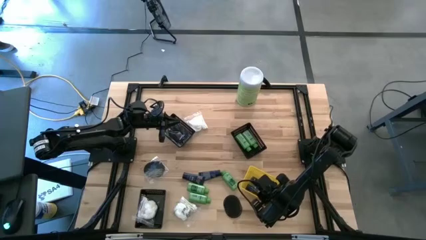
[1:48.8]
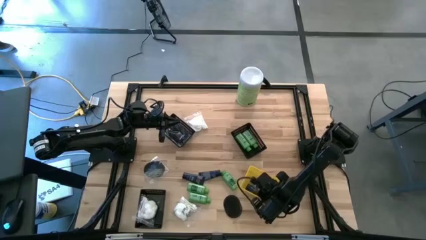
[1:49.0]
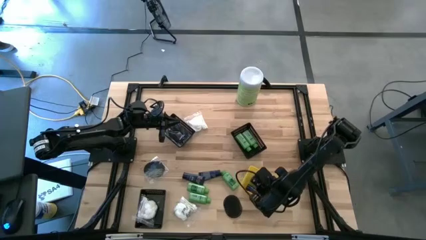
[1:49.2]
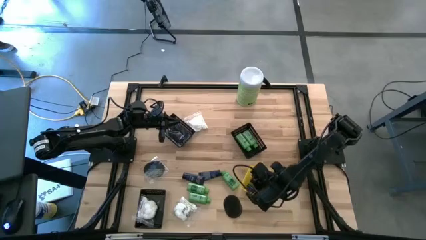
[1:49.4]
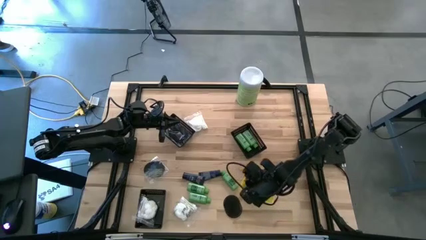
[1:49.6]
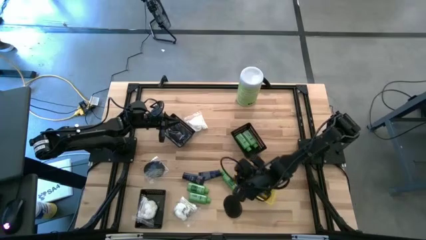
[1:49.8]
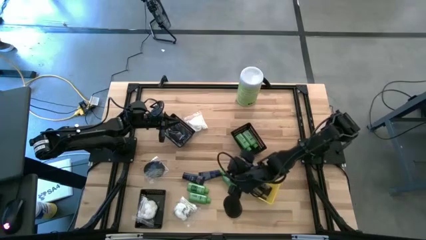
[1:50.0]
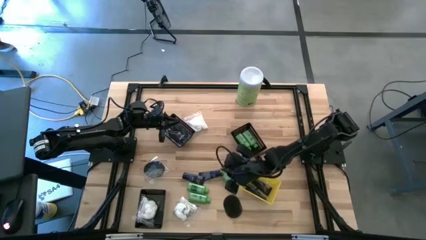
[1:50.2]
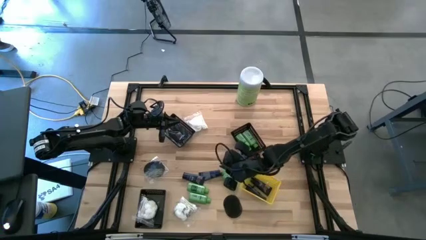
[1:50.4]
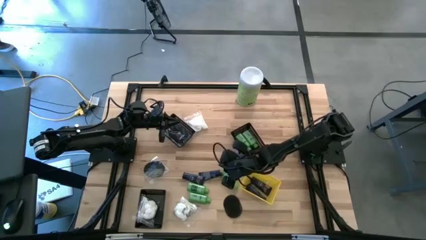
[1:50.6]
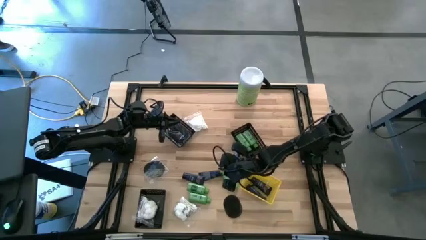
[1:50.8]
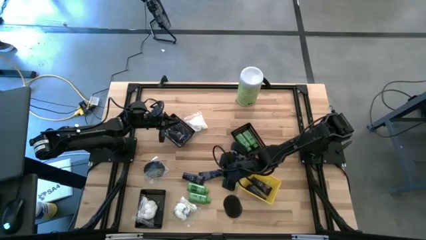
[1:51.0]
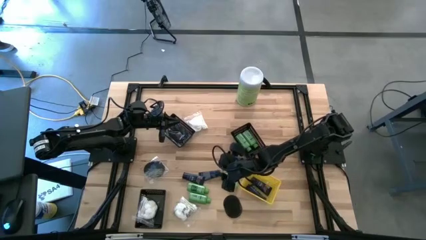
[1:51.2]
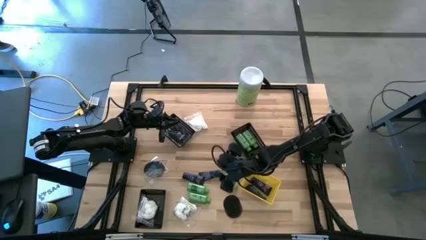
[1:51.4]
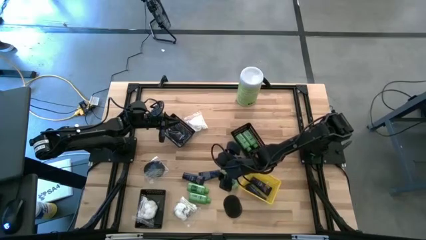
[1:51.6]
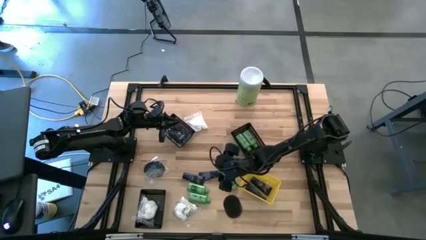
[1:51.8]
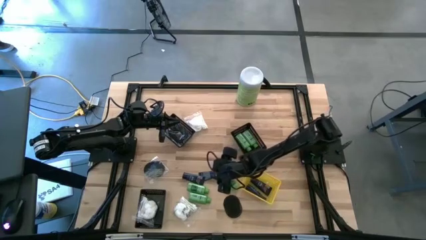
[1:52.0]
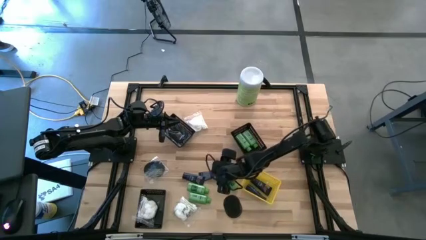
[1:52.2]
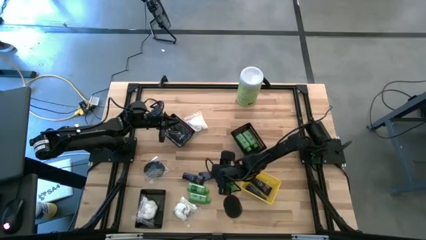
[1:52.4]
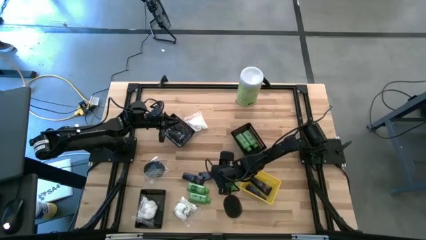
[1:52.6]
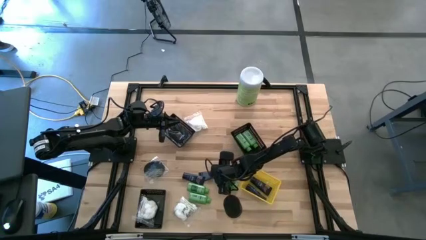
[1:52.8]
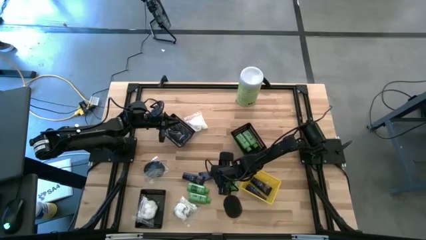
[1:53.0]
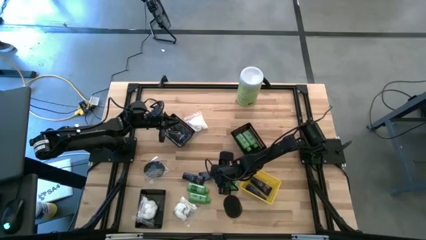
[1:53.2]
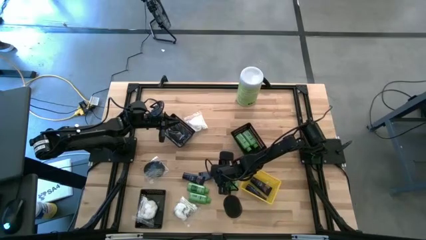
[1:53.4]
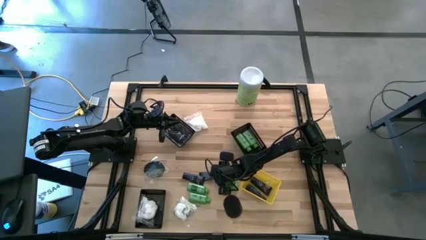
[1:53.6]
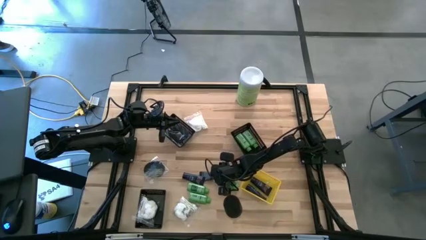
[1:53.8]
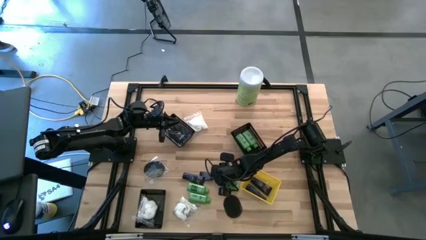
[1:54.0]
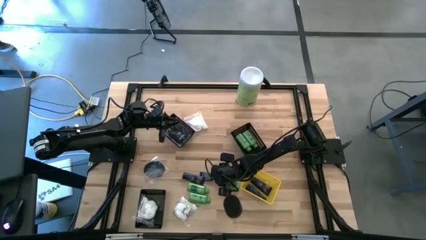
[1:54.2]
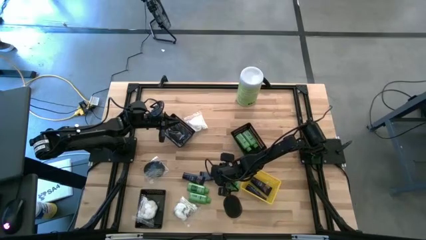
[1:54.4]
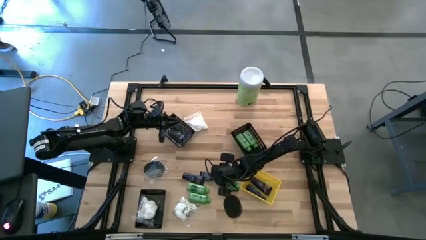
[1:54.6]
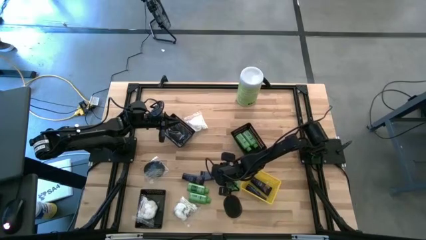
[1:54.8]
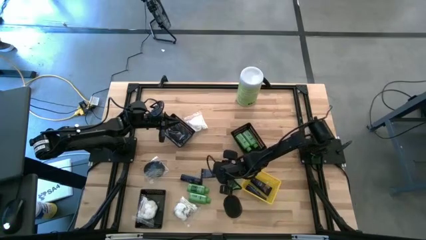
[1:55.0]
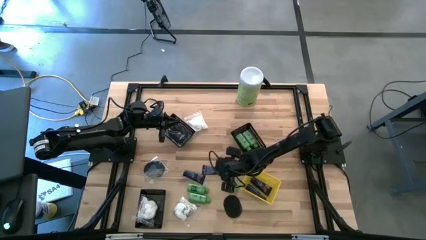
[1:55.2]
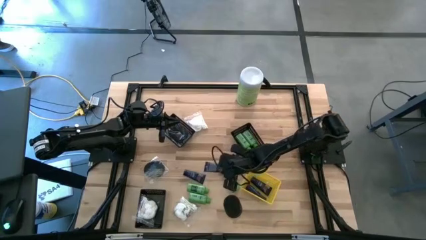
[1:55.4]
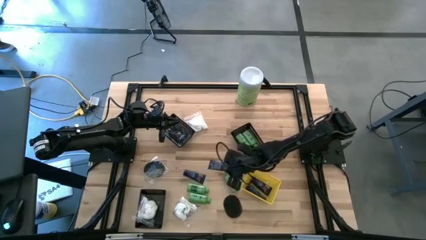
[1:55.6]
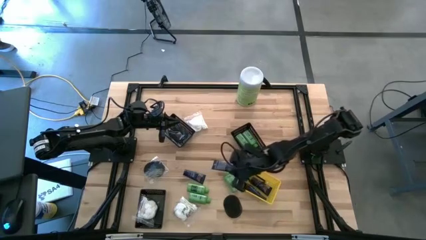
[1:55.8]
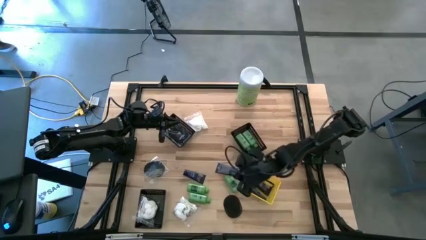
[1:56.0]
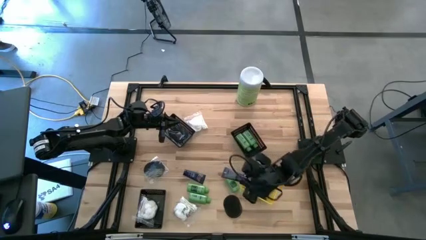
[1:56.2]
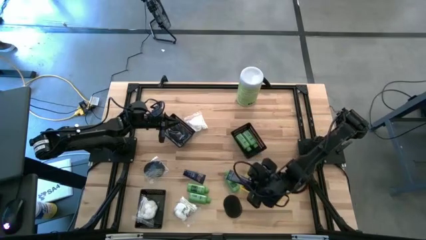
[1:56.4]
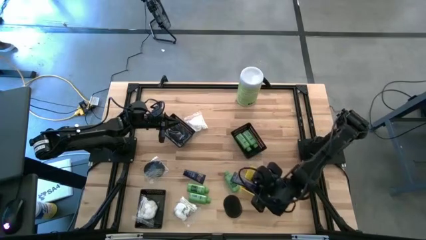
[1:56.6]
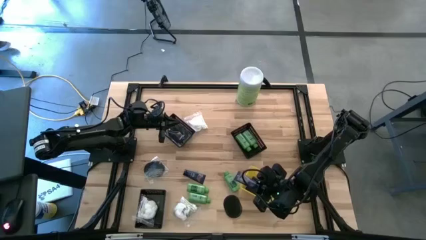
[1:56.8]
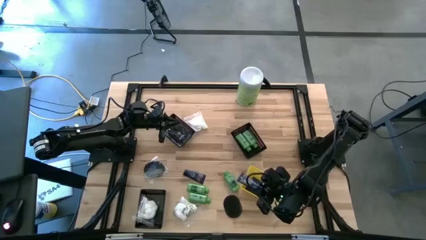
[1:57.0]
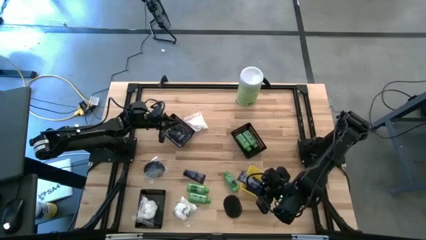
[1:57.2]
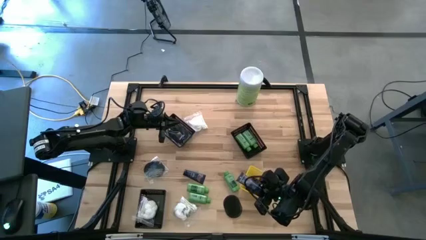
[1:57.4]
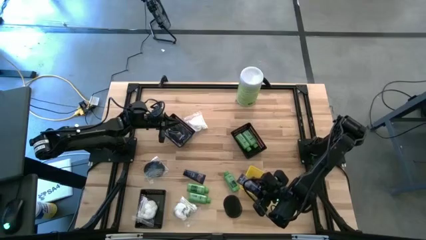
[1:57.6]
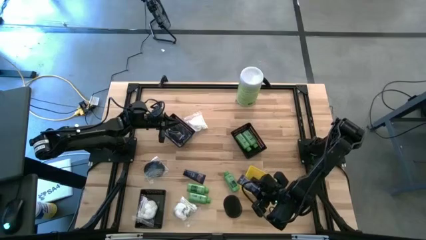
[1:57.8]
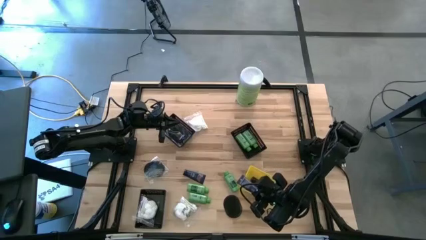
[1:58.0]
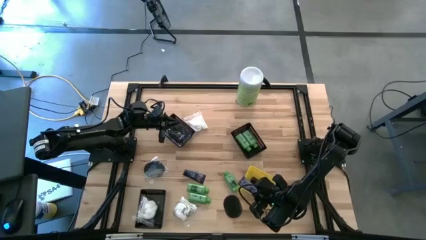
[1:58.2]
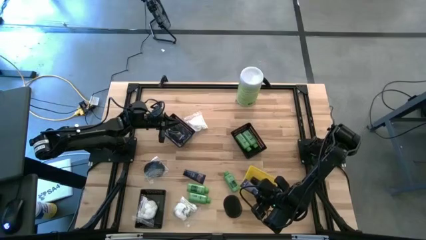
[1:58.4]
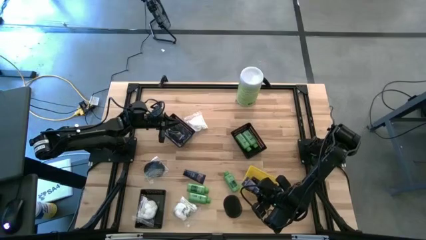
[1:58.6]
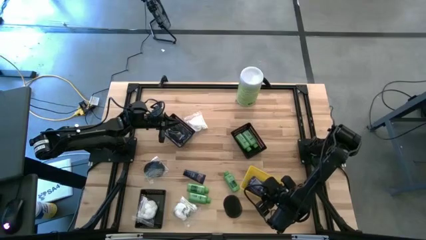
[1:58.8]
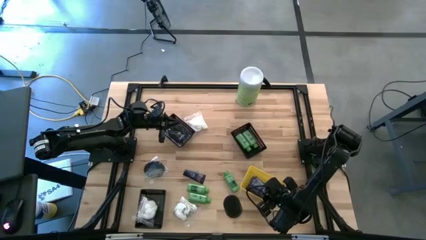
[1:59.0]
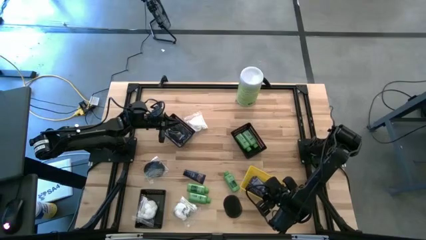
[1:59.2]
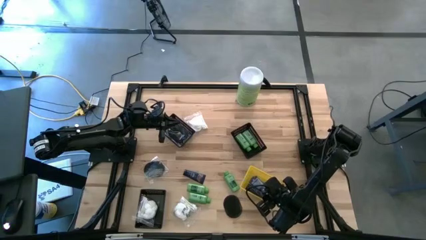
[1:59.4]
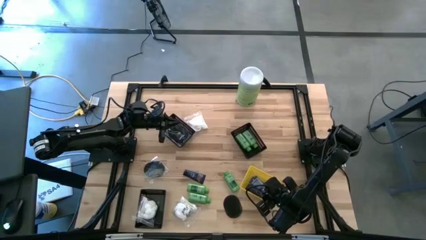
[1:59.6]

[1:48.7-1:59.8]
Task: Pick & Place Travel size toiletries
Put the shaving cream tube into the yellow bin

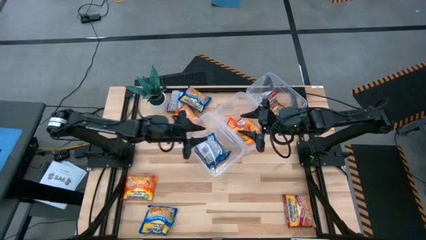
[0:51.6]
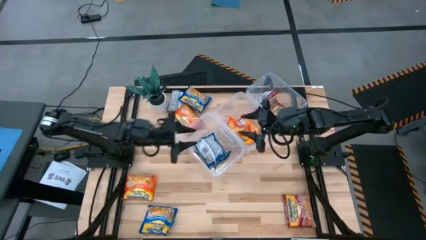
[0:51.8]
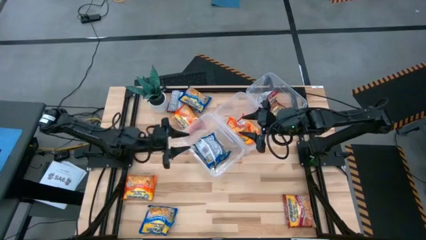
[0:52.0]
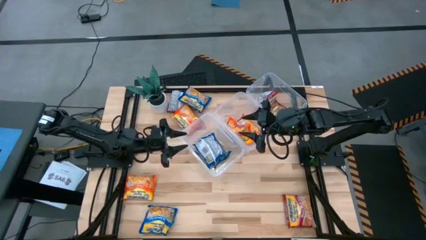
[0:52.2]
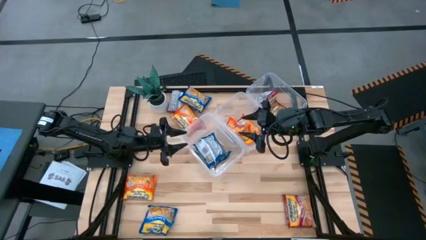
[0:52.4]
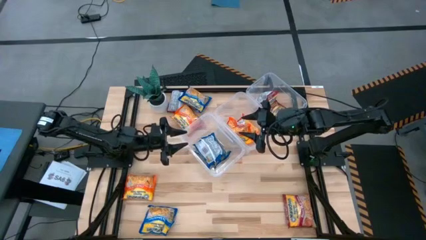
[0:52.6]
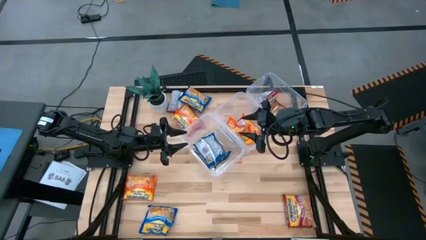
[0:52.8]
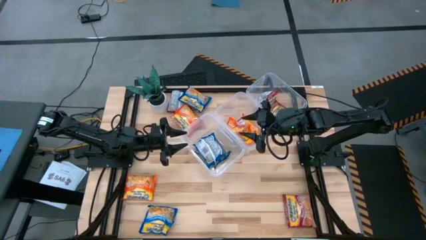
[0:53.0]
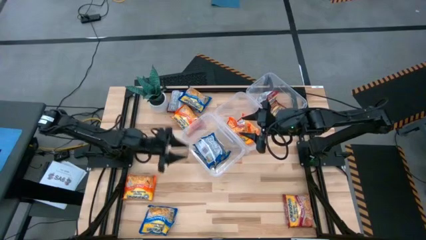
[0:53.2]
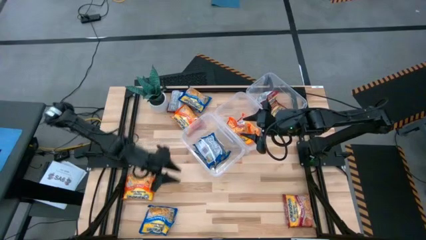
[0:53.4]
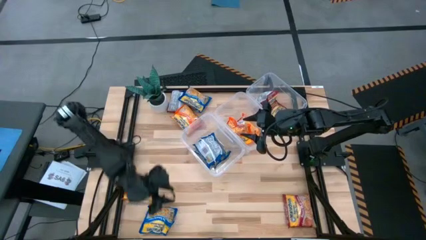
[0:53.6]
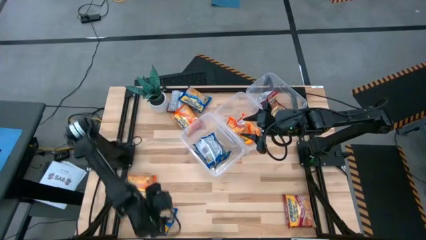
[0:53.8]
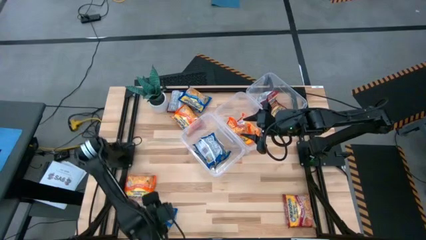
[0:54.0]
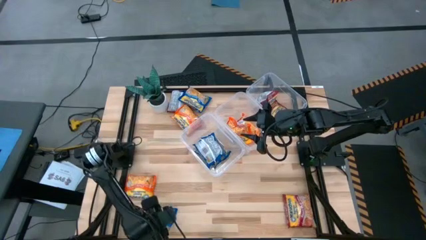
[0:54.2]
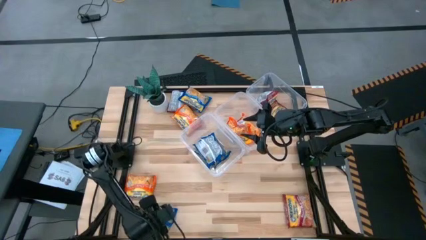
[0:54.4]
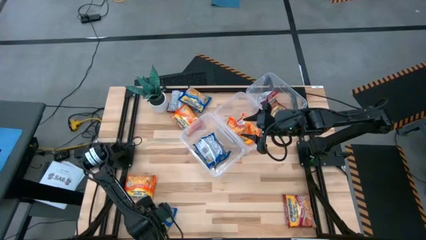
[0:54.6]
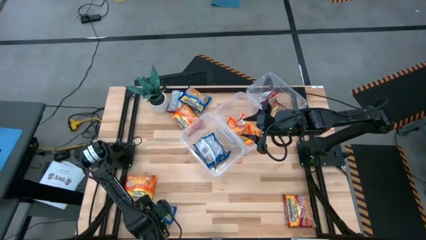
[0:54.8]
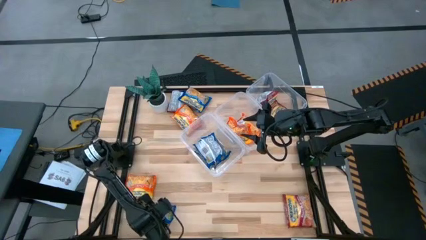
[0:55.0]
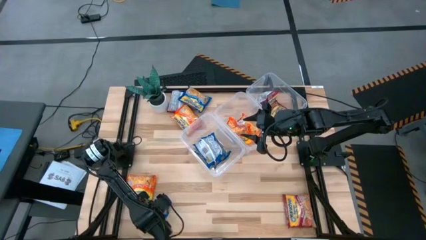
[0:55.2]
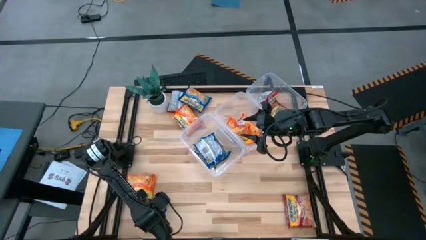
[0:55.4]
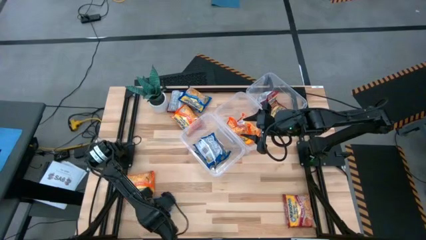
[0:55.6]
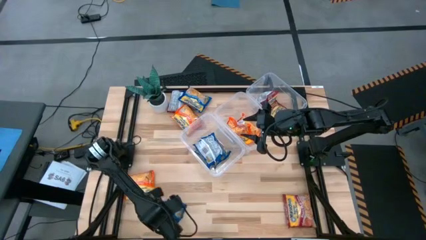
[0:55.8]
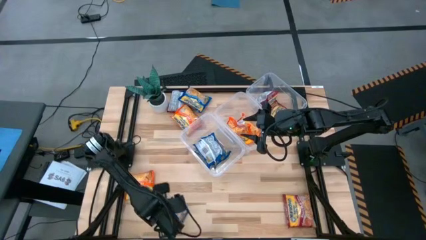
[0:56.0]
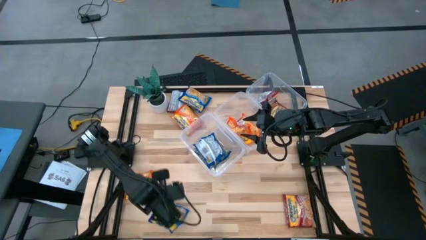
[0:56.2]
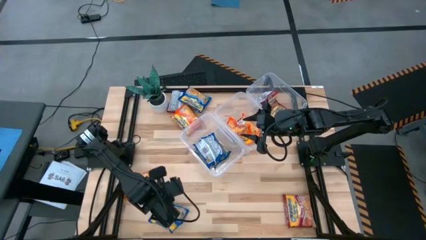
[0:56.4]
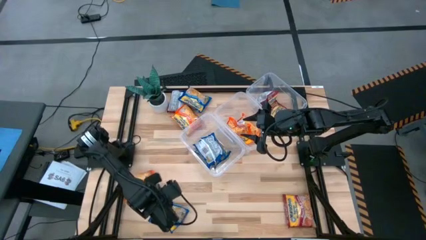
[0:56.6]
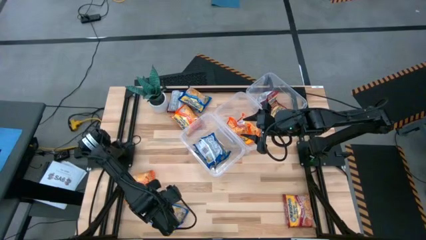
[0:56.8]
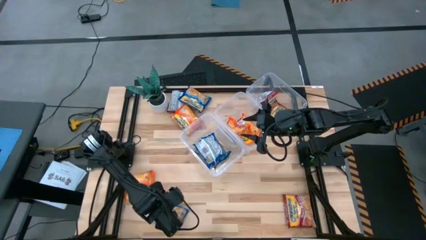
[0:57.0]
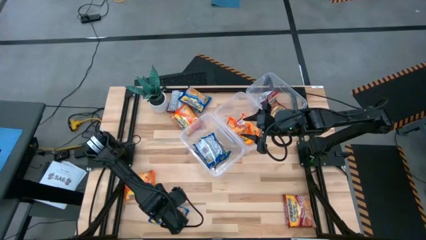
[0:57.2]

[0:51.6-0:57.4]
Task: Sort Maruchan noodles
Put the blue noodle pack into the left transparent bin
